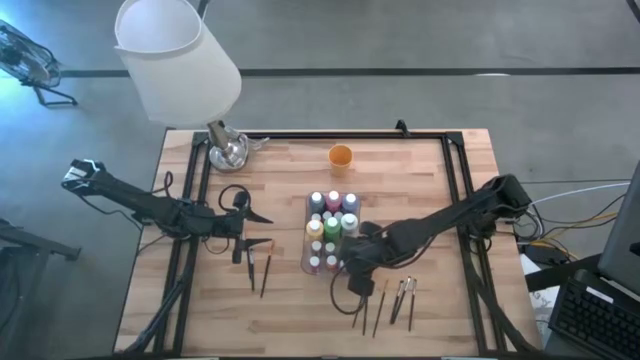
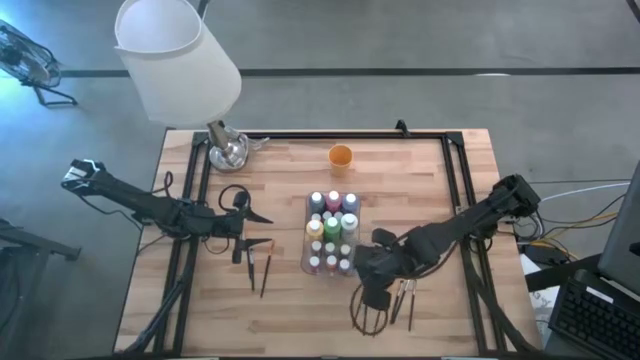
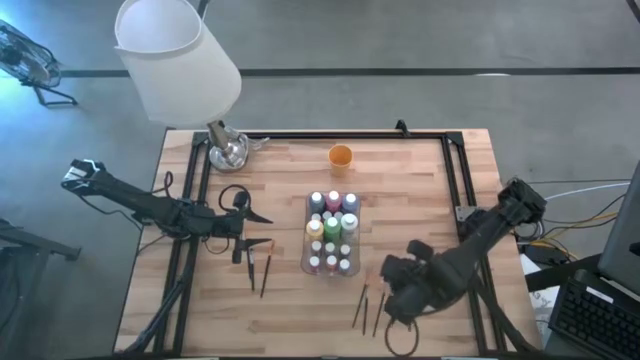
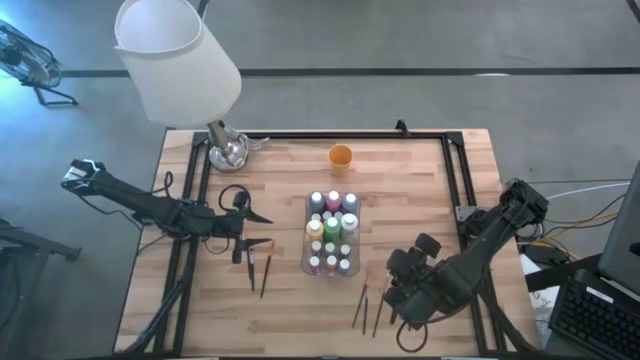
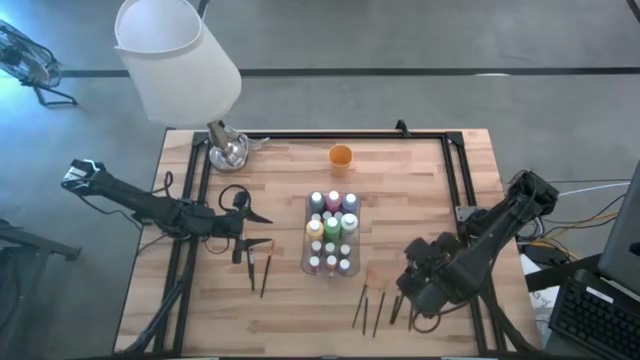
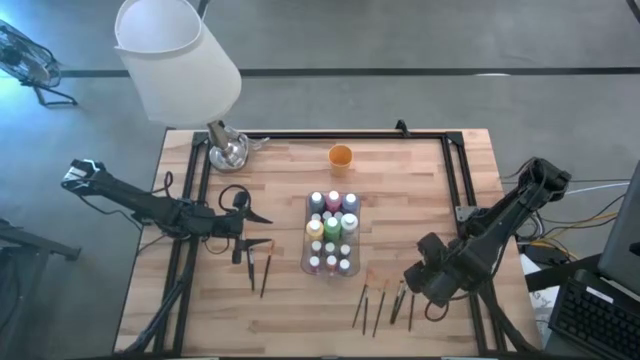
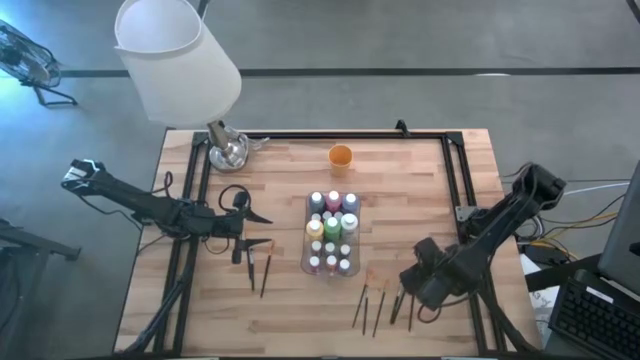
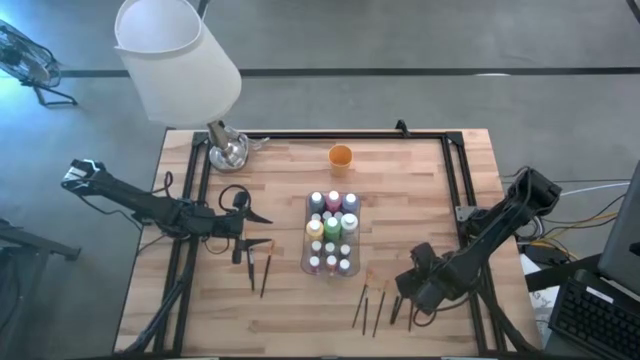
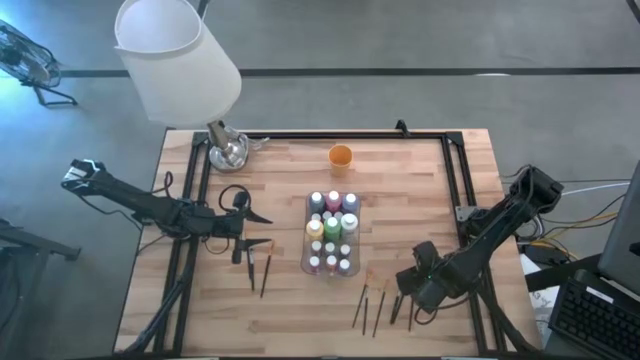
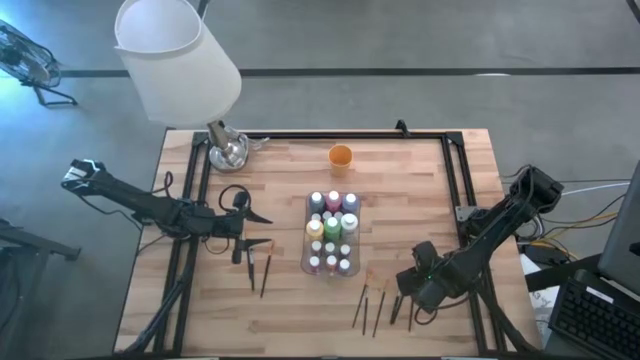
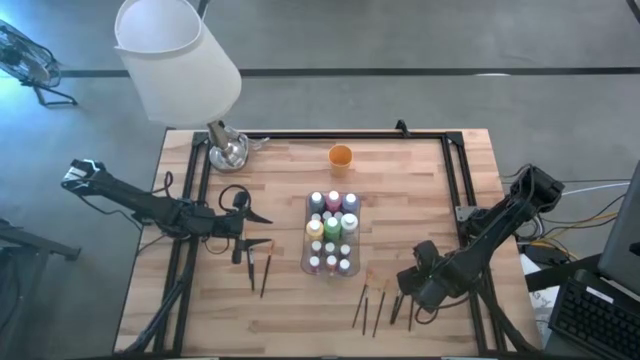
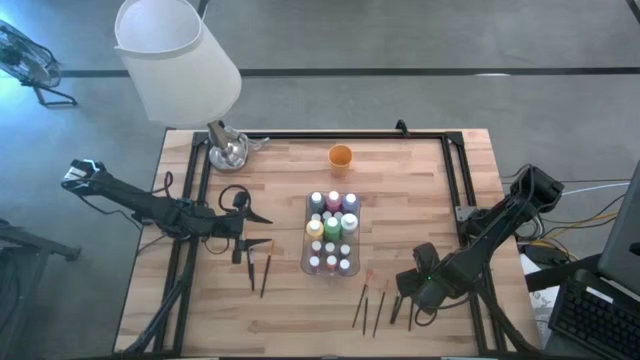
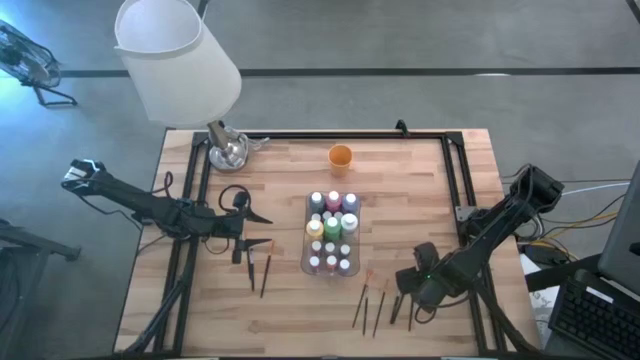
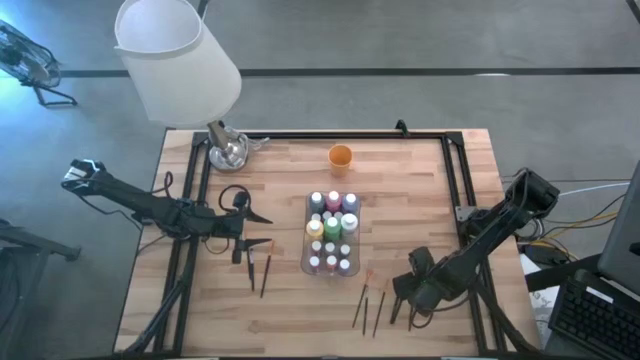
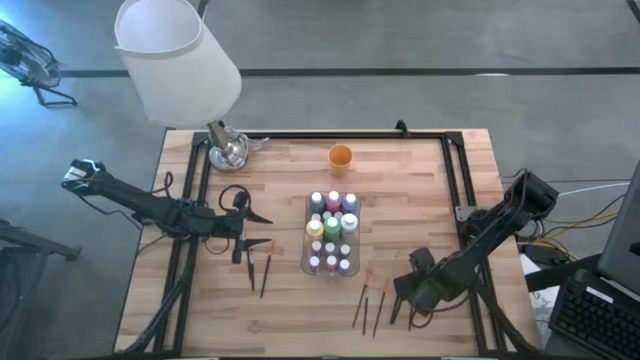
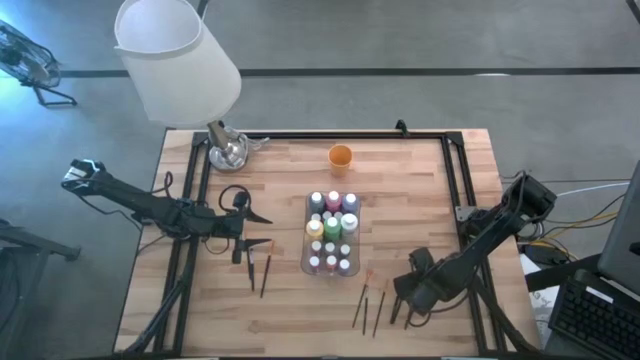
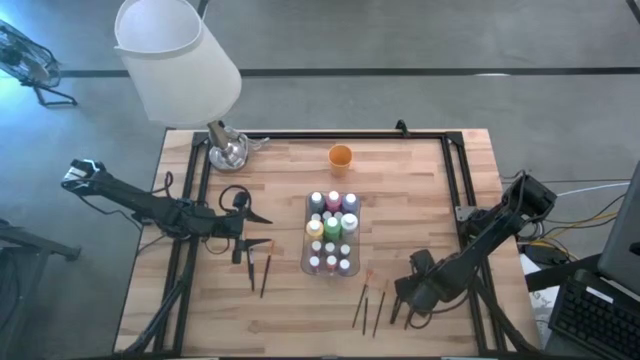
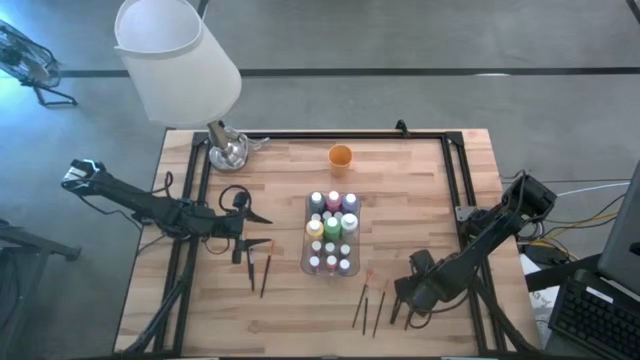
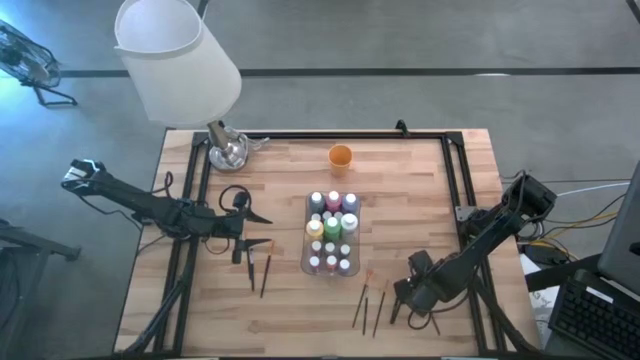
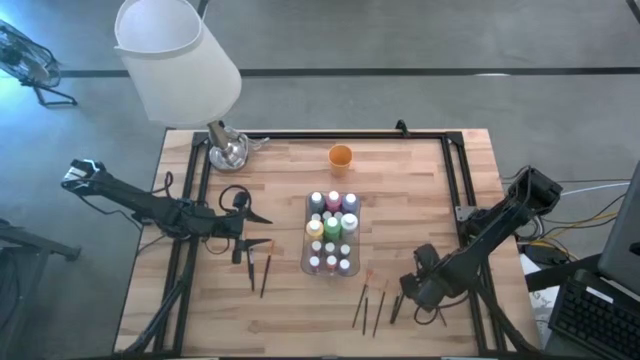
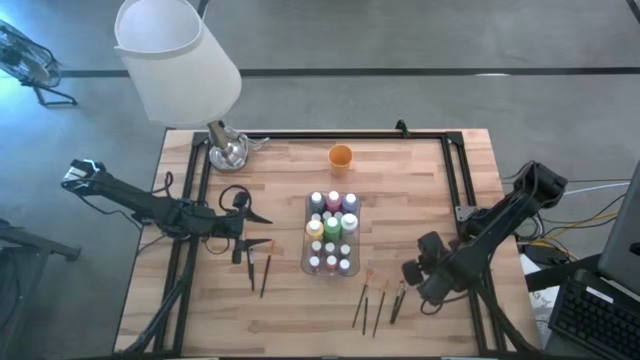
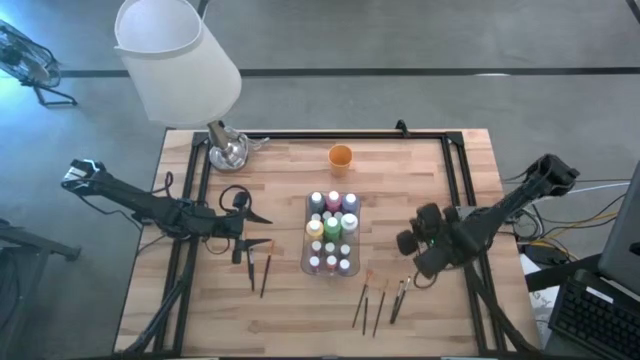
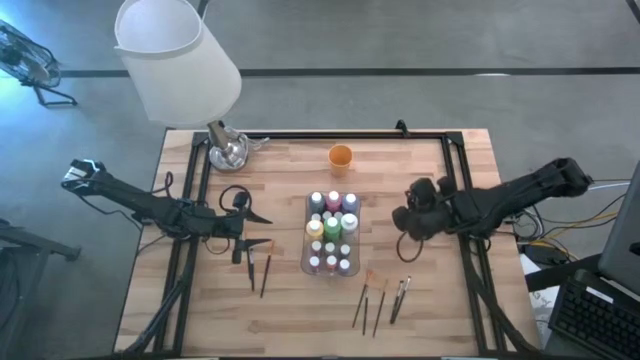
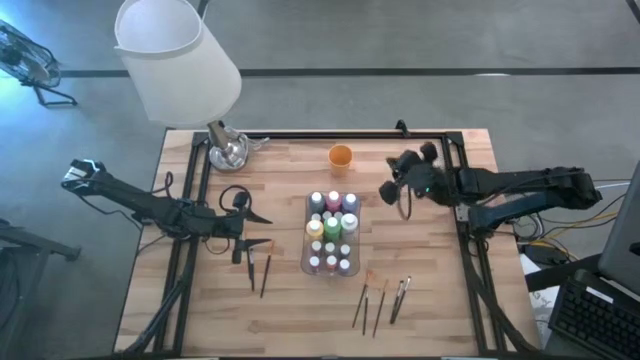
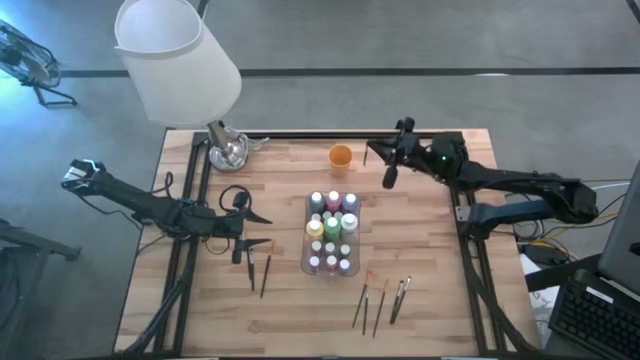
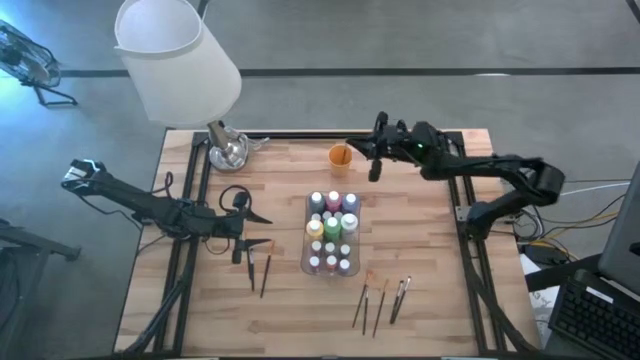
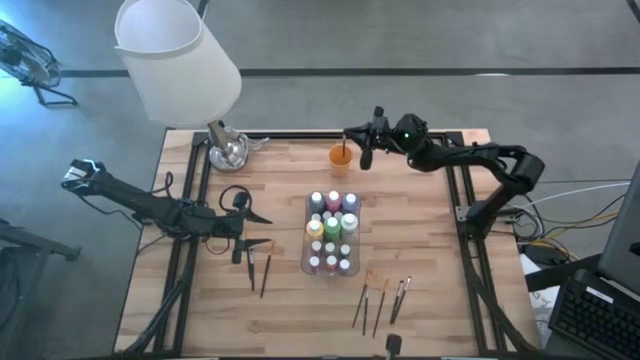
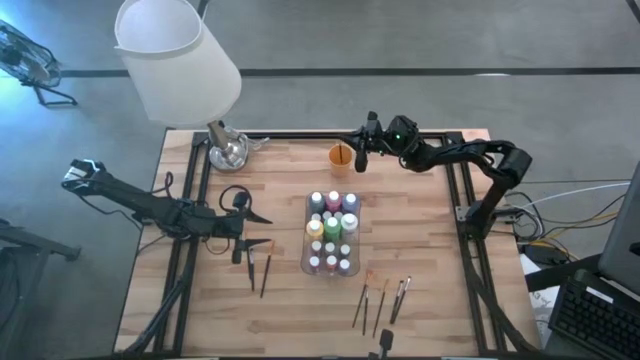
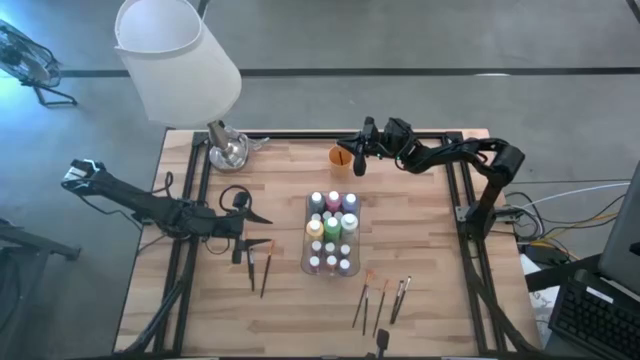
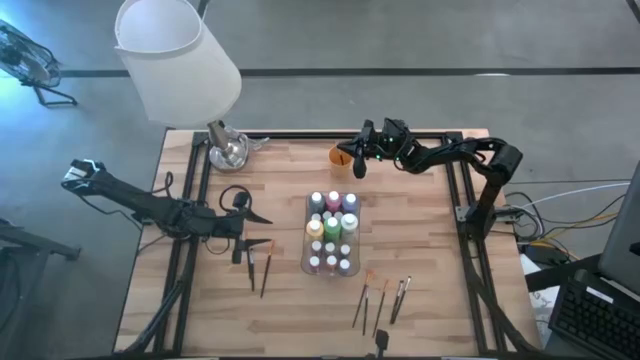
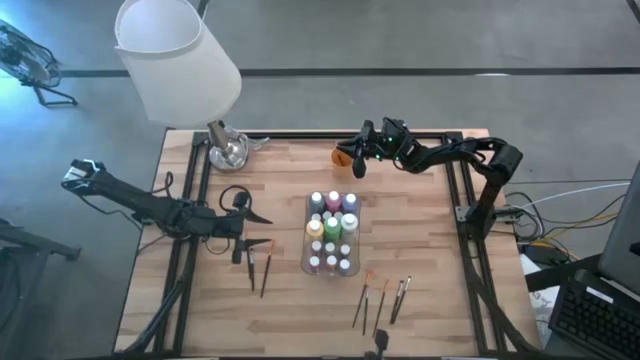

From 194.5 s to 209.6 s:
Task: Pick & Place Paint Supplies
Put the gray paintbrush into the yellow cup

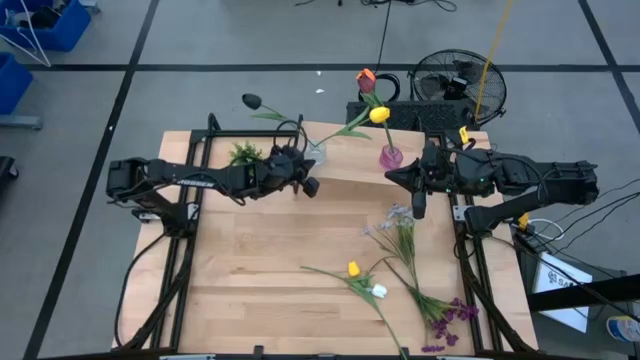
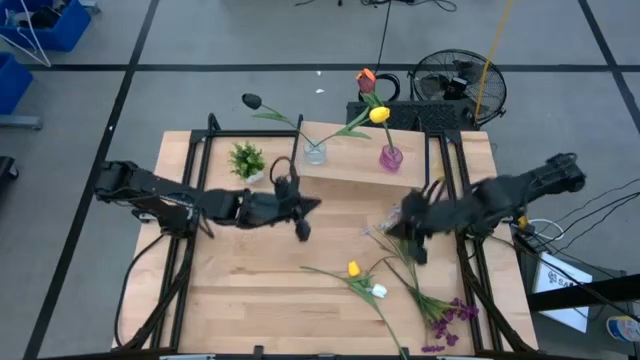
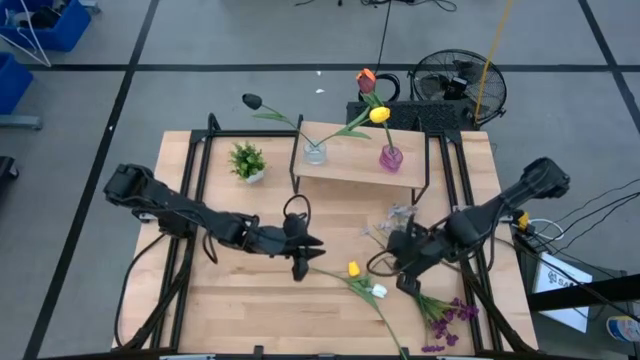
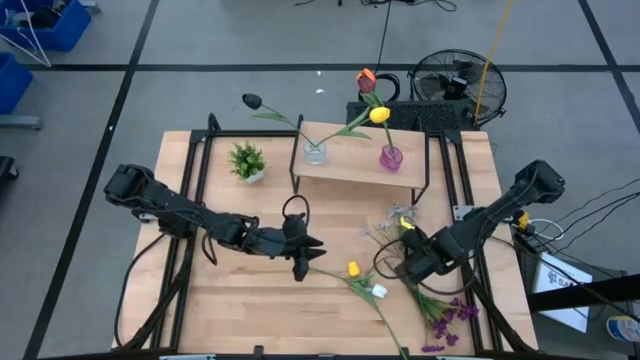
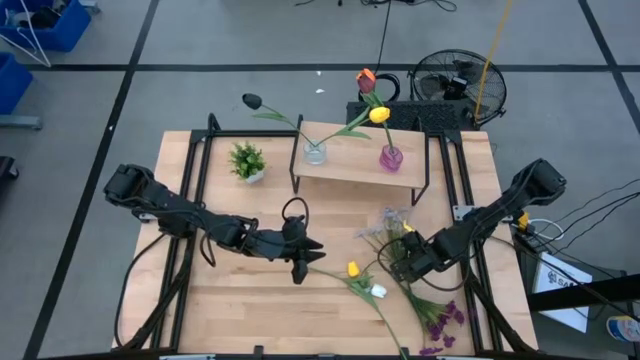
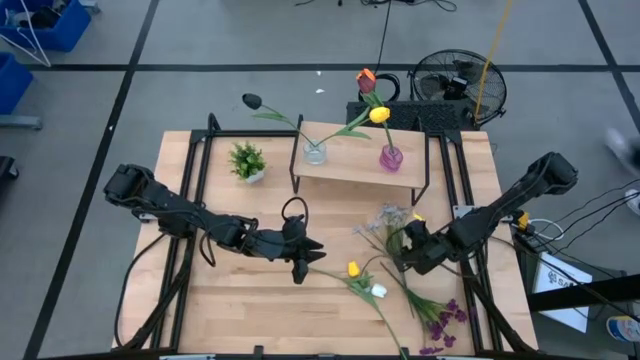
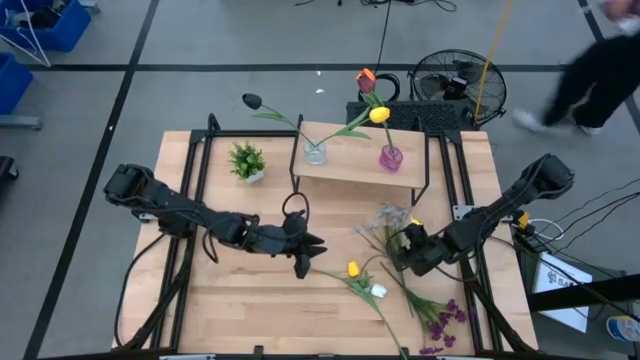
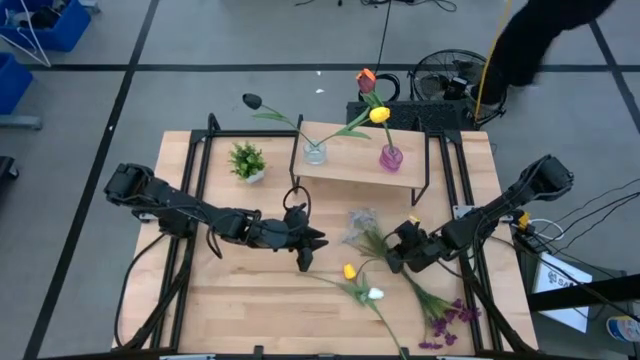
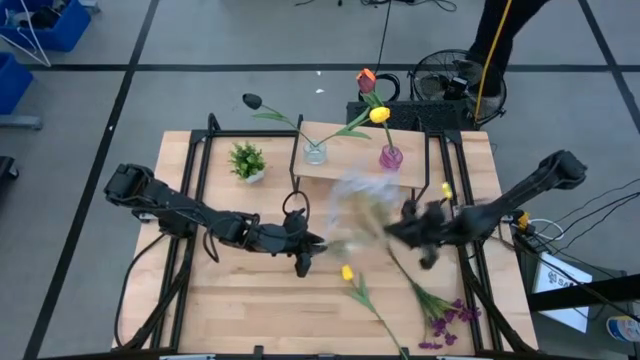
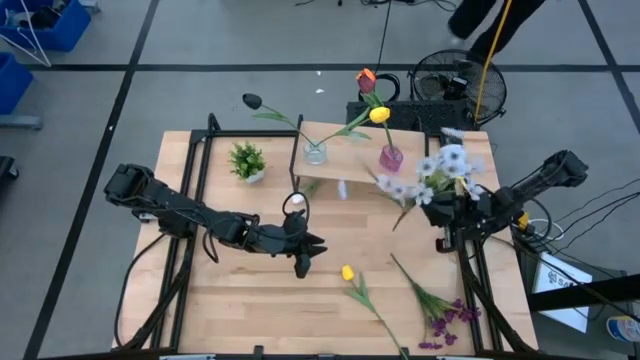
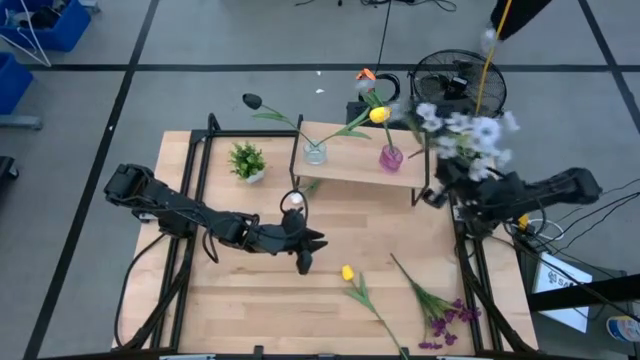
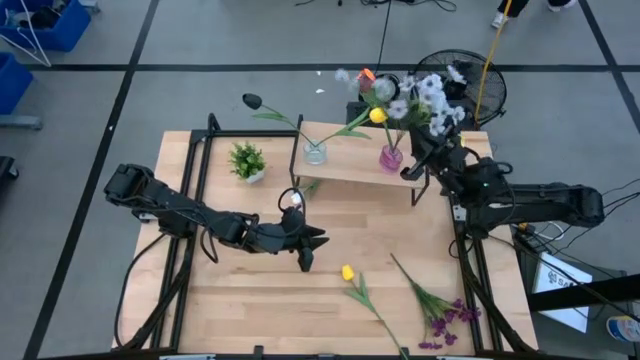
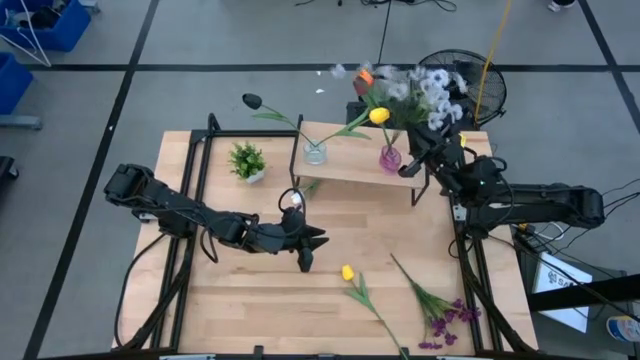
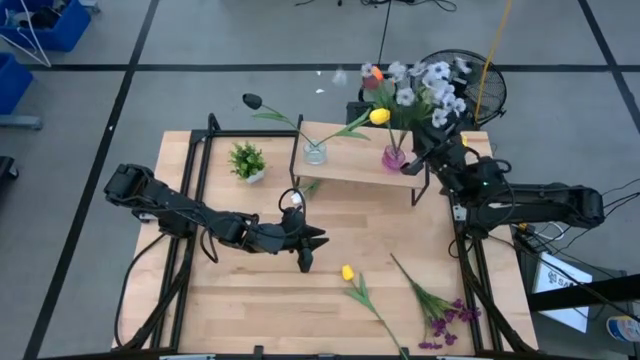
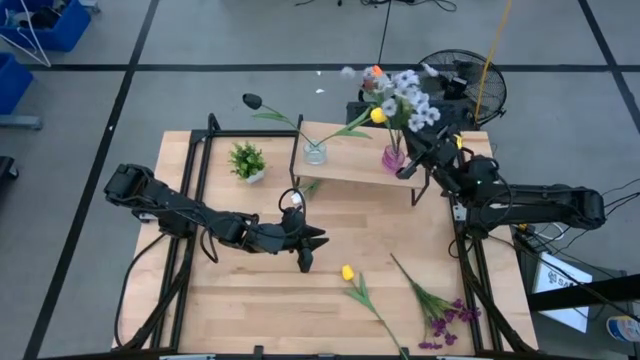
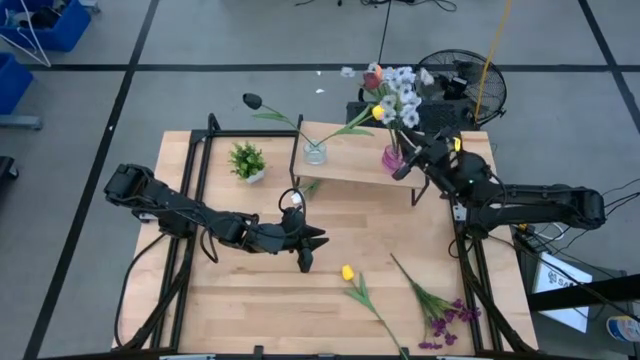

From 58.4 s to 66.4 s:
Task: Pick and place flowers into a vace then onto a shelf
Put the white flowers into the purple vase
